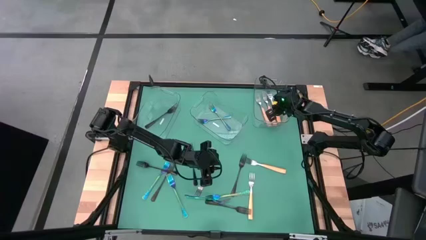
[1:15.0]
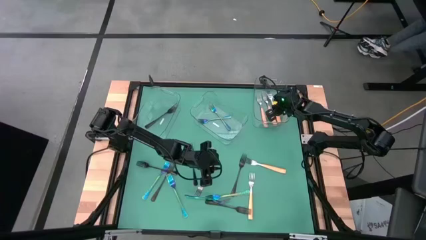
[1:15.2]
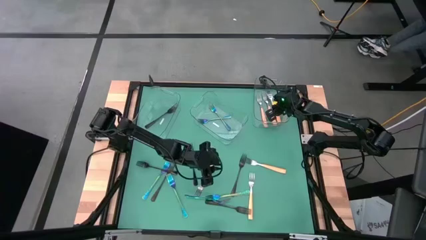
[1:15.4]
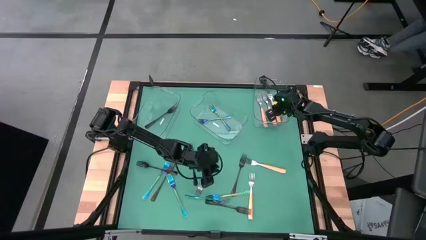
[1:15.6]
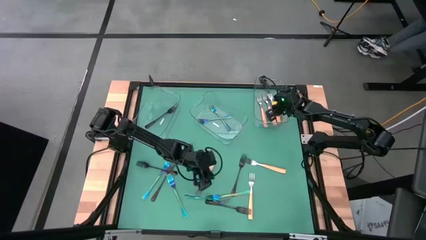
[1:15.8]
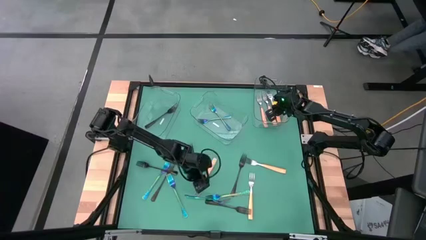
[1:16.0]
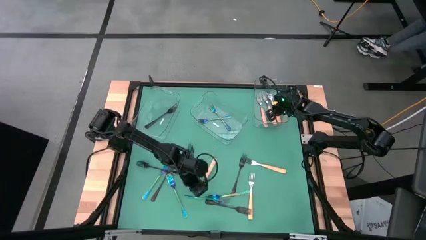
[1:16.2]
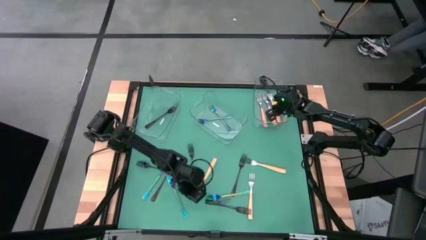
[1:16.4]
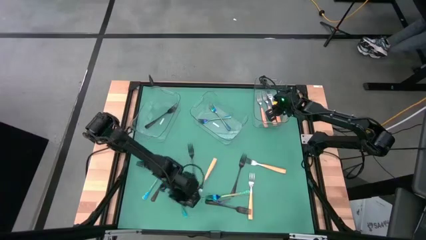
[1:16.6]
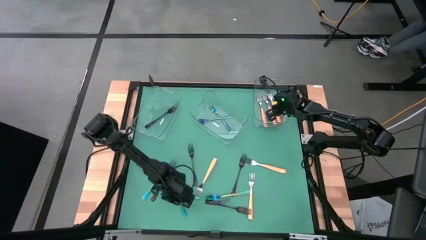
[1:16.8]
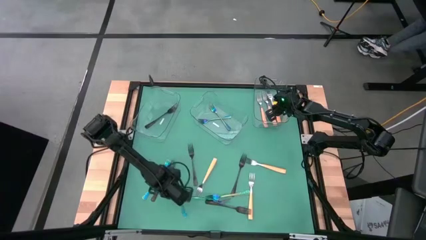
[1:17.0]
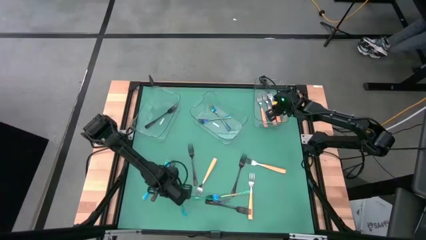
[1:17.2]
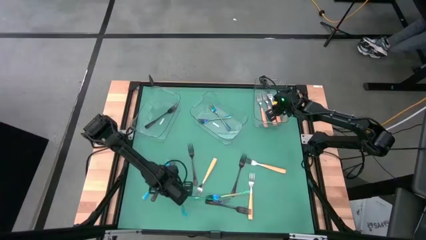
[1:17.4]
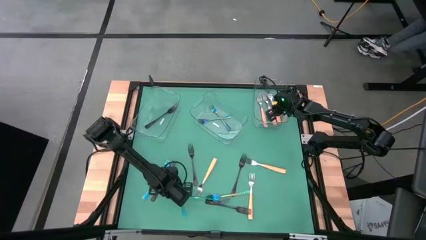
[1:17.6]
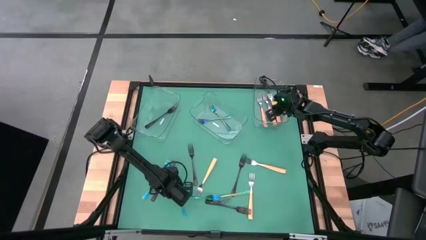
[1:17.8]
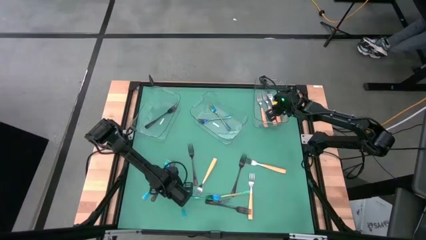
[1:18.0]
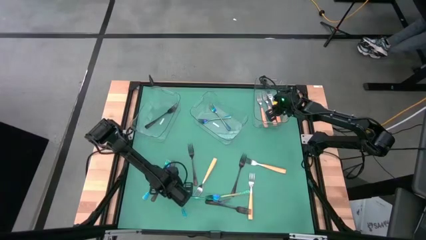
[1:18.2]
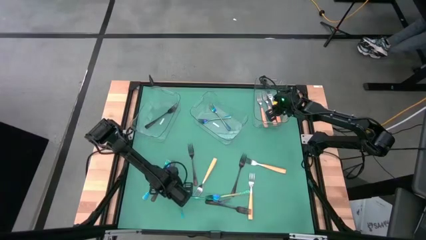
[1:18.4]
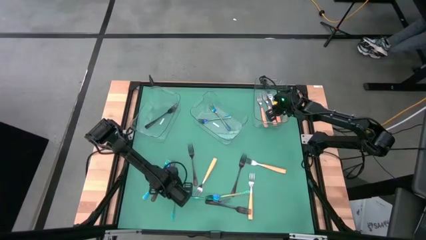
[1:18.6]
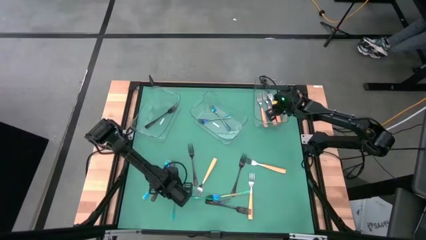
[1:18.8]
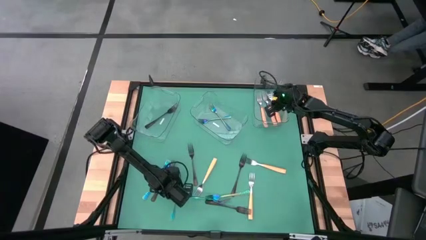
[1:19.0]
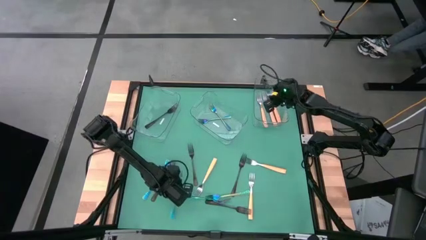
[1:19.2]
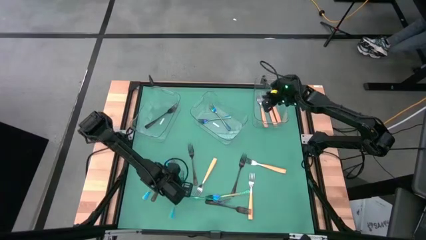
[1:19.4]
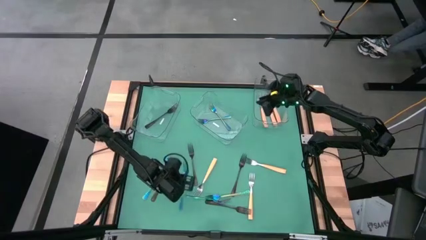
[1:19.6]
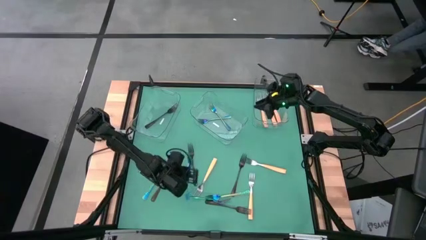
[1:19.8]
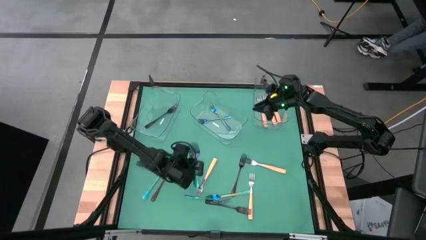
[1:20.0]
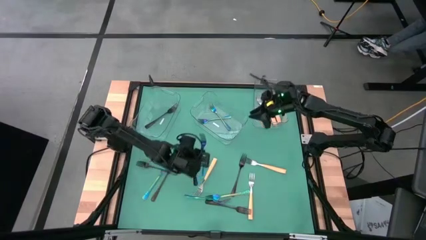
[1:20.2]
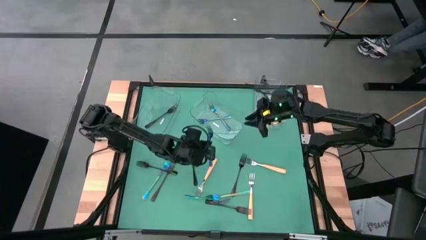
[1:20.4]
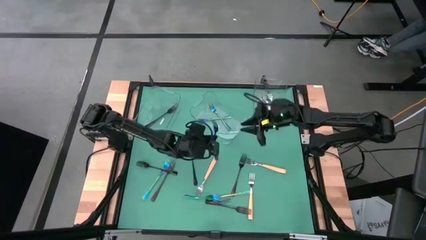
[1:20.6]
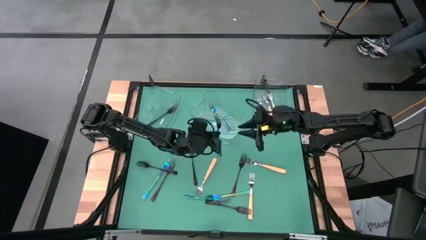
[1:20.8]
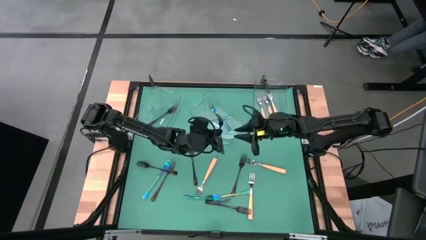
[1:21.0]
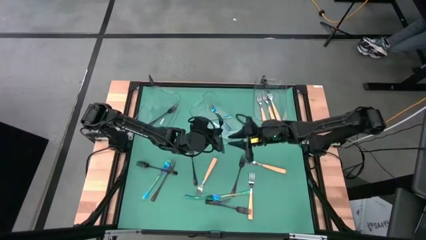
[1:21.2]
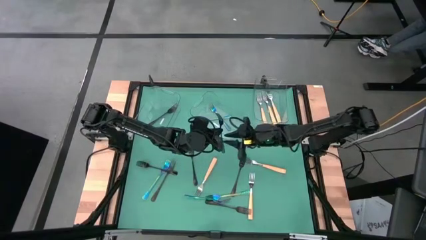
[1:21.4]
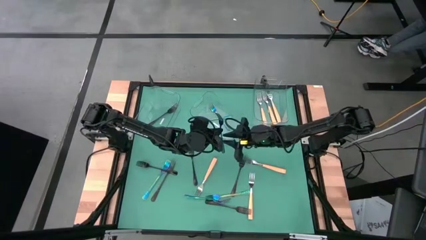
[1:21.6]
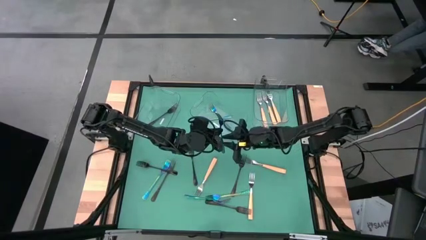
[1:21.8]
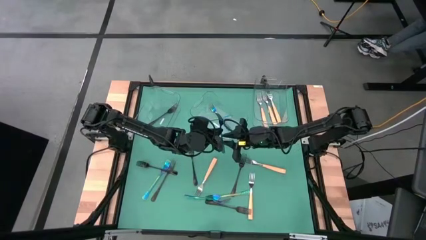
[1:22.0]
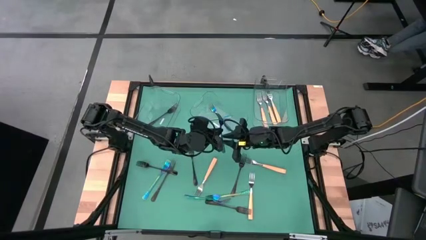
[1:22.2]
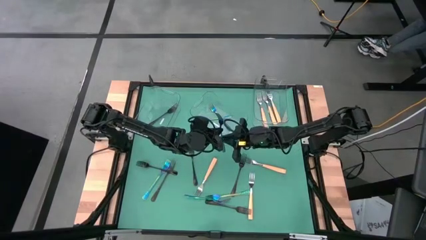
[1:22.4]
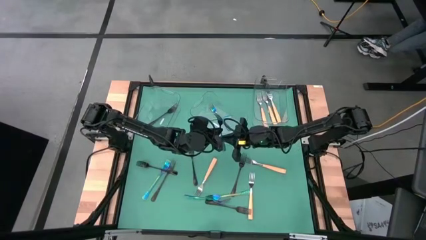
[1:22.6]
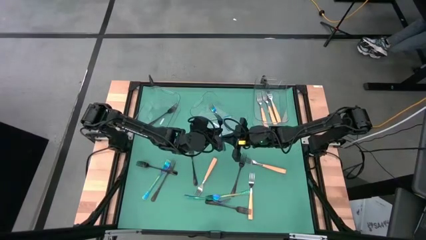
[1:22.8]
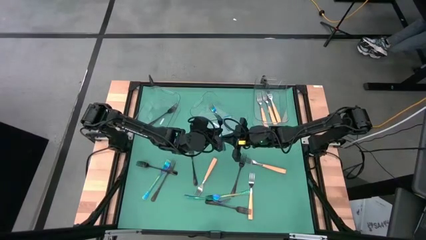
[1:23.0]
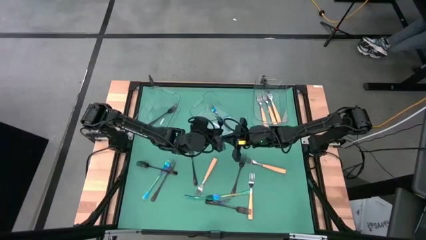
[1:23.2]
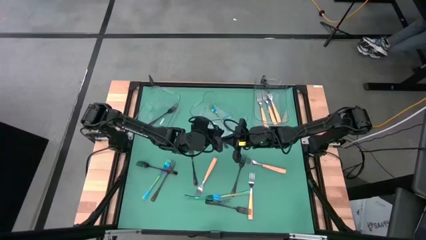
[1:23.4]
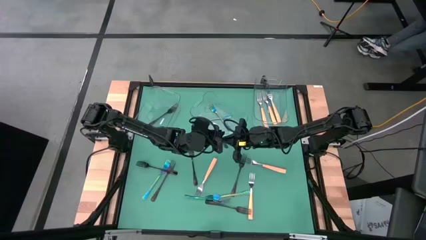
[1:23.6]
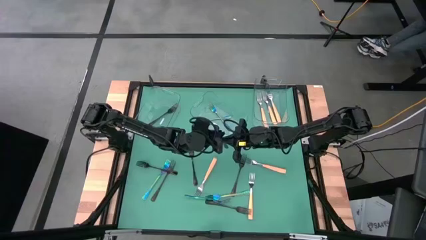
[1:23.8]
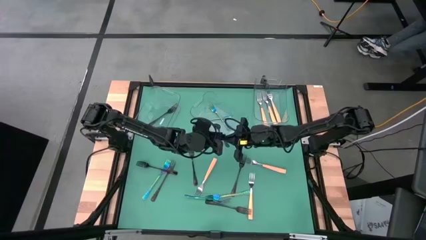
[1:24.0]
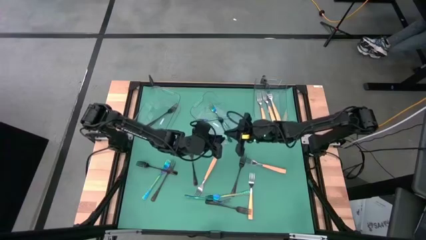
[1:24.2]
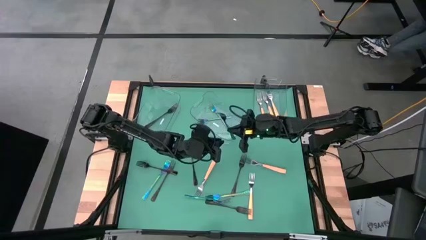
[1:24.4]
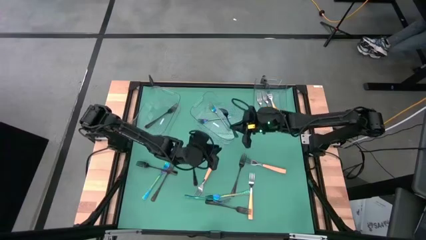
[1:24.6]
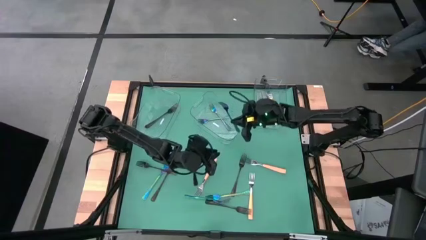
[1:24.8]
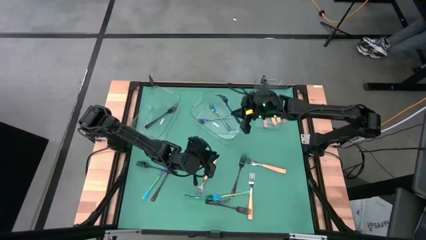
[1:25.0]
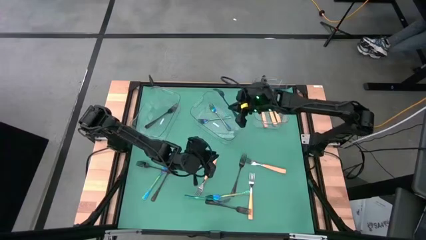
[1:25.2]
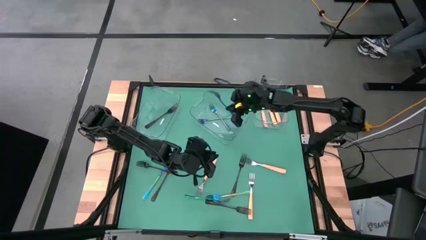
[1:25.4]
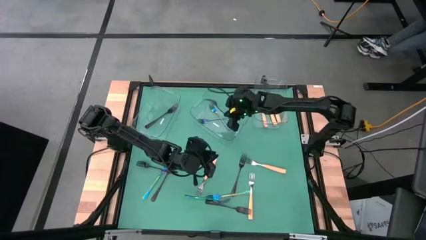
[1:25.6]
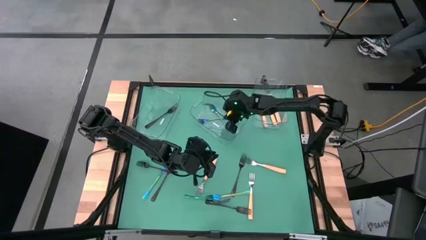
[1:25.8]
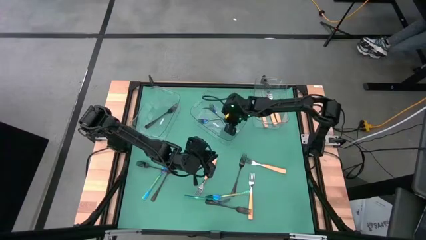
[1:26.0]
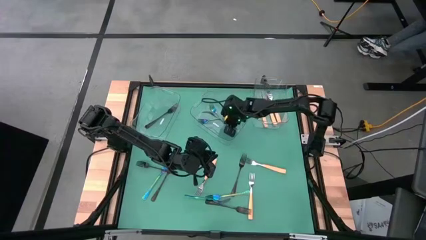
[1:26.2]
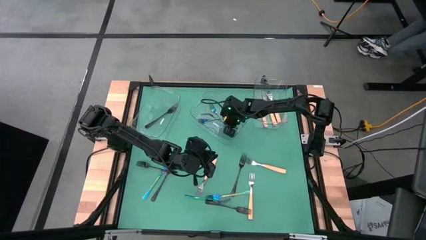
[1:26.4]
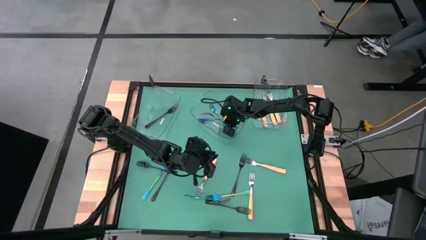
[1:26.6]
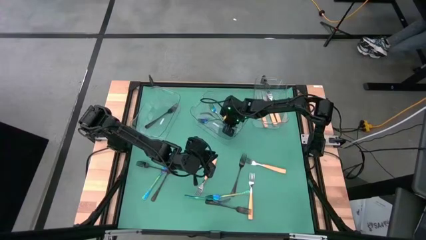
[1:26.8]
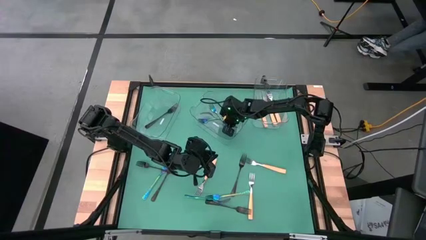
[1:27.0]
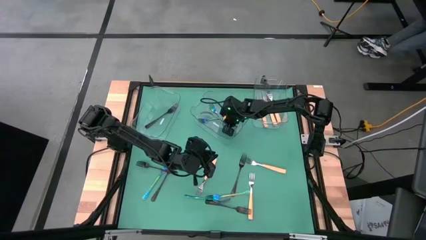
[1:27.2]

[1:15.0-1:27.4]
Task: Sort silverware by color (type)
Put the blue fork into the center transparent bin

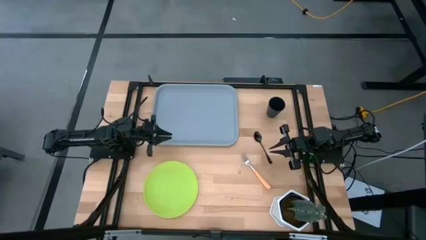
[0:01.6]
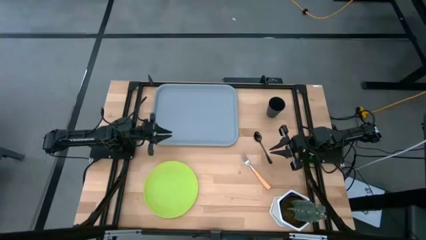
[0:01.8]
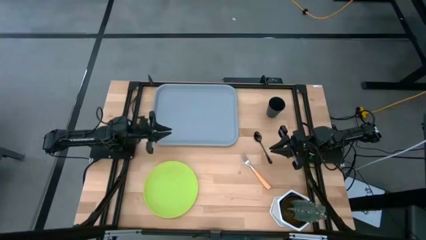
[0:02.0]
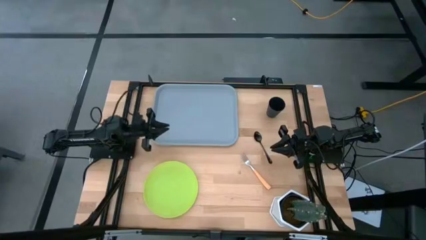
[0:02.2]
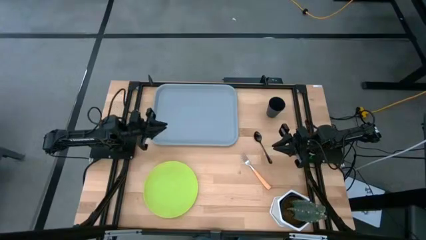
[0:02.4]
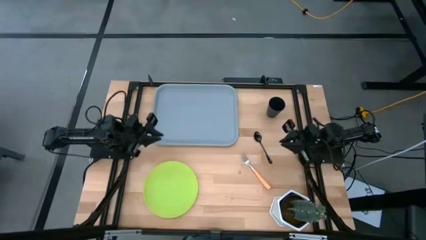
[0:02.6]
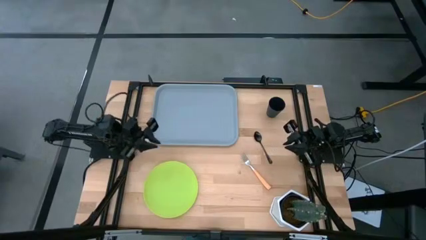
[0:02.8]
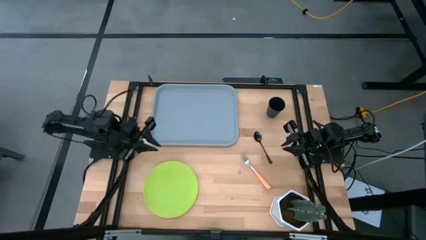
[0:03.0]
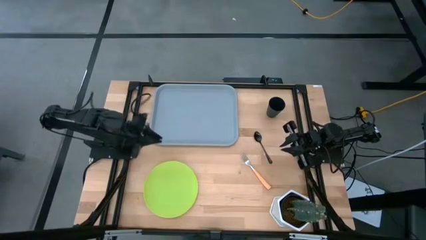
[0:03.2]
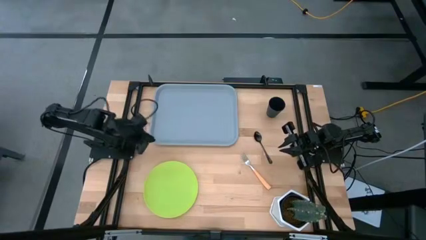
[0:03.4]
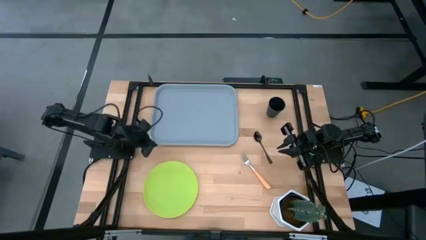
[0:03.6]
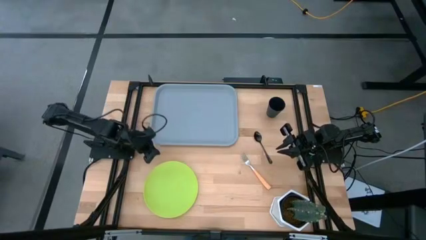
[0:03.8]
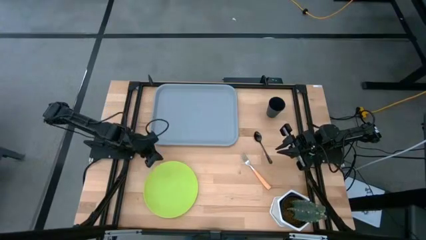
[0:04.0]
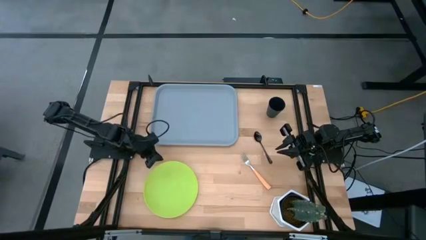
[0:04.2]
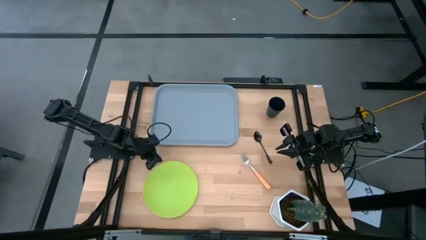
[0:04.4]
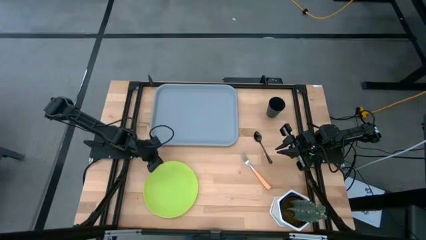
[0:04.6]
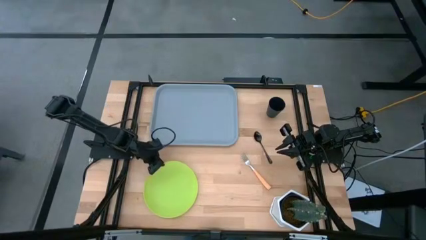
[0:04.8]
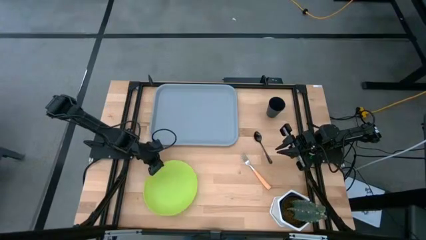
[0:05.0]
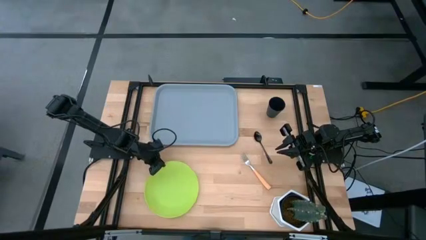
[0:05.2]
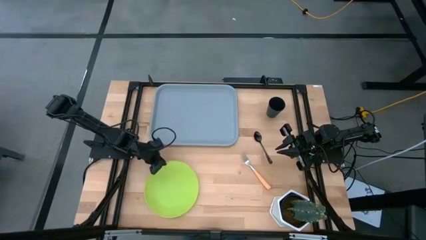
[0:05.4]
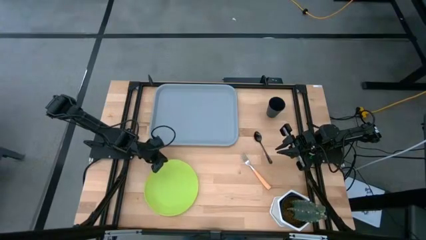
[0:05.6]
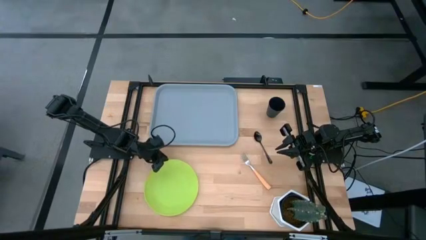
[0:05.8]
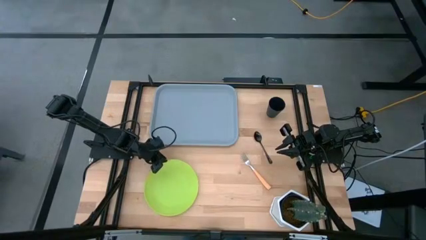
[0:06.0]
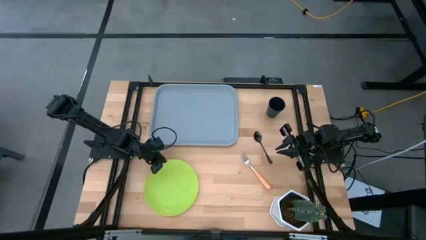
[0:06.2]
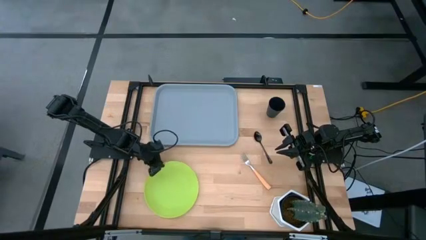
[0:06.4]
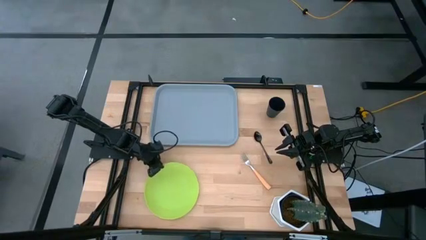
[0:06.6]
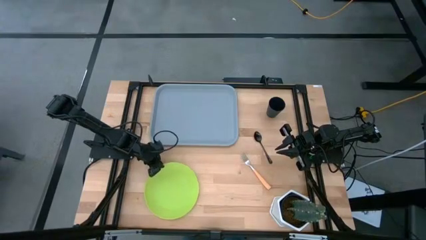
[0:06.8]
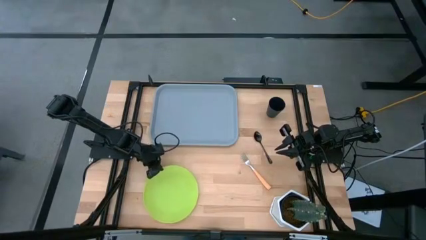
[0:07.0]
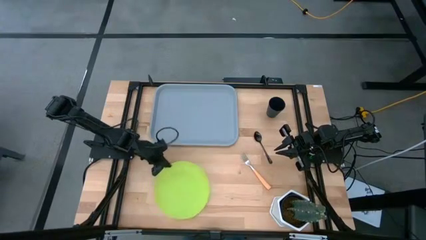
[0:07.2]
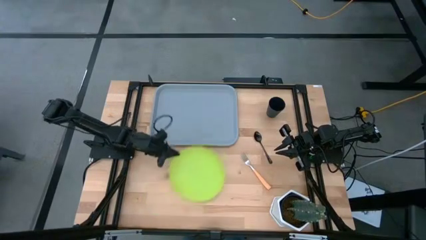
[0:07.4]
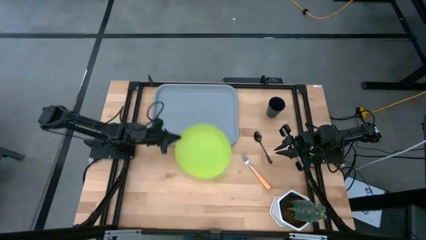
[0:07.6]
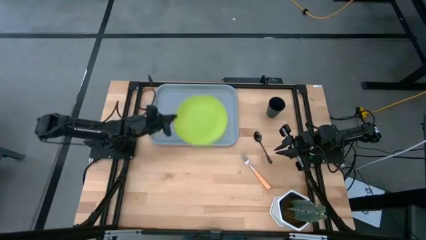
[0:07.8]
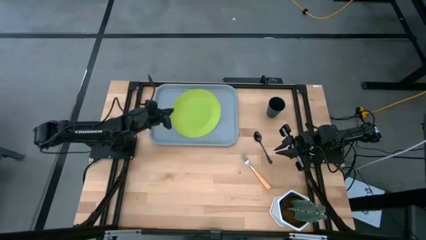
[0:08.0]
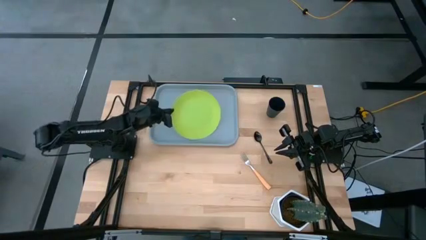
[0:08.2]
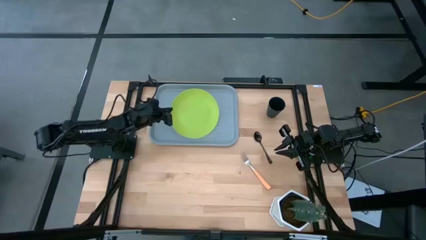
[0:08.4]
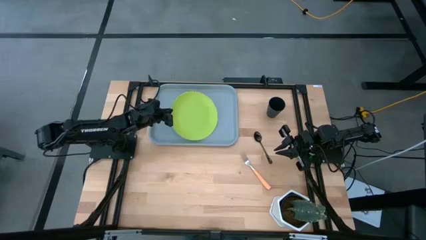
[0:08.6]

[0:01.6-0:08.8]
Task: Pick and place plate/cup/fork/spoon on tray
Put the light green plate on the gray tray
